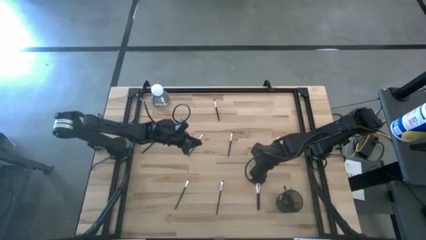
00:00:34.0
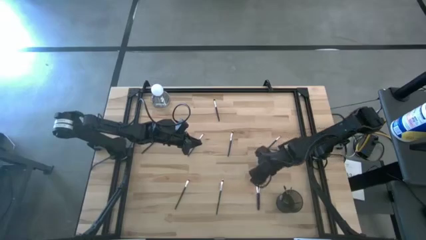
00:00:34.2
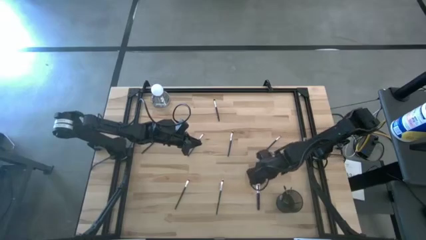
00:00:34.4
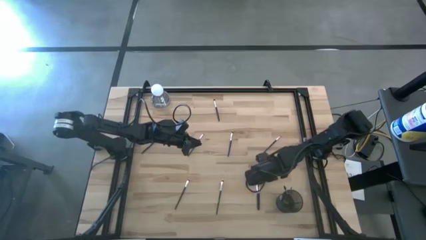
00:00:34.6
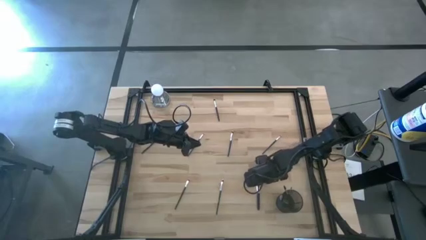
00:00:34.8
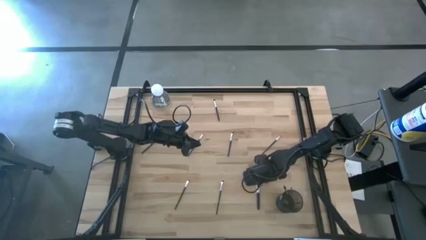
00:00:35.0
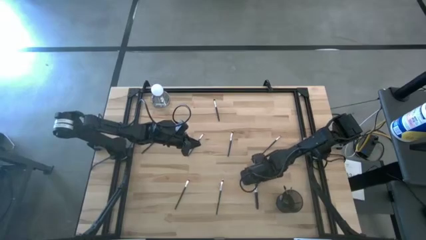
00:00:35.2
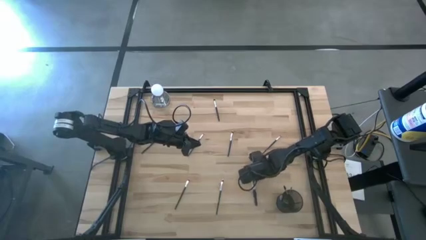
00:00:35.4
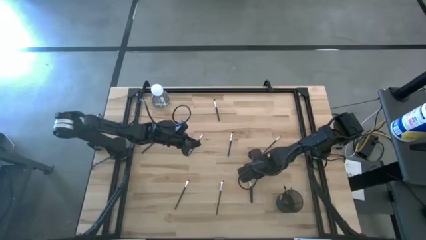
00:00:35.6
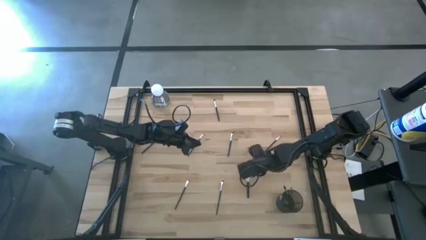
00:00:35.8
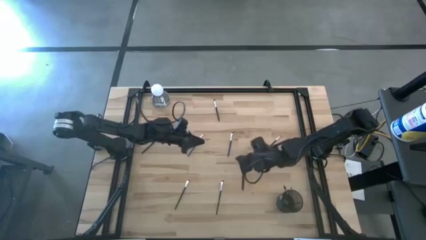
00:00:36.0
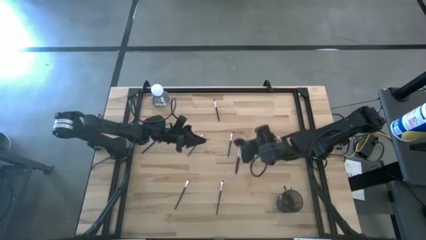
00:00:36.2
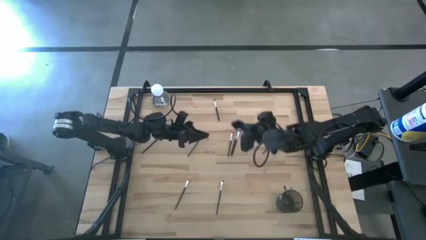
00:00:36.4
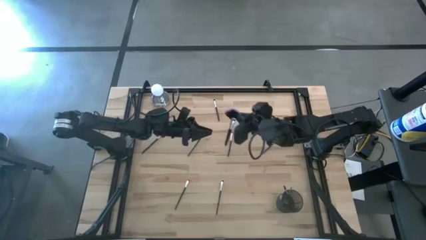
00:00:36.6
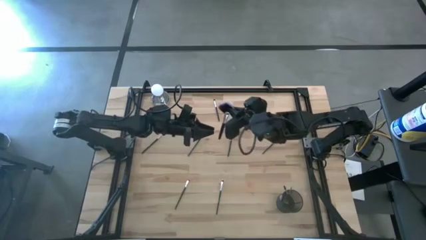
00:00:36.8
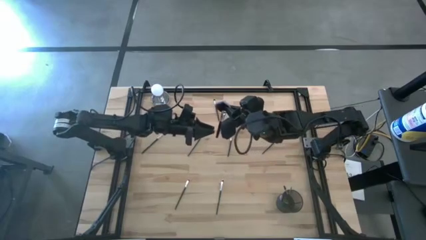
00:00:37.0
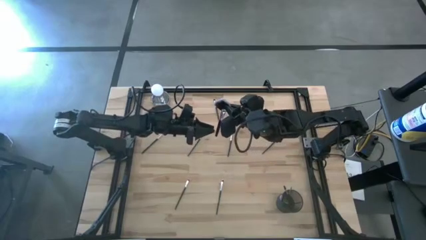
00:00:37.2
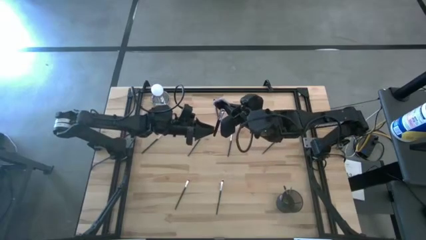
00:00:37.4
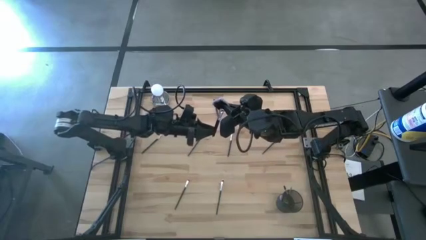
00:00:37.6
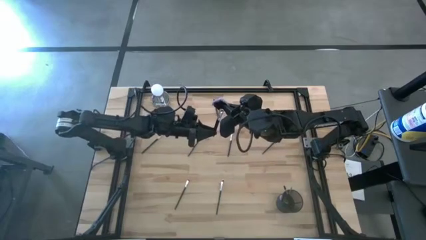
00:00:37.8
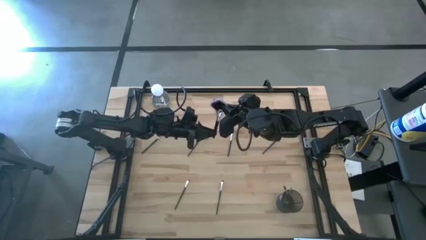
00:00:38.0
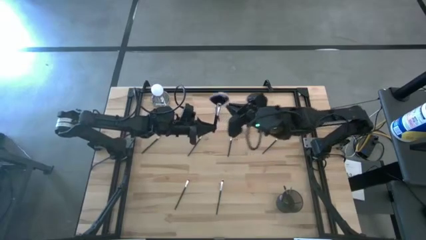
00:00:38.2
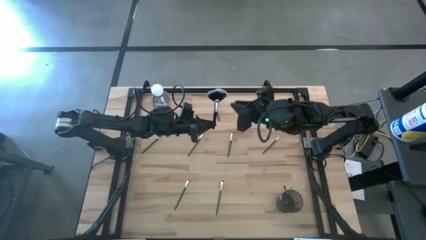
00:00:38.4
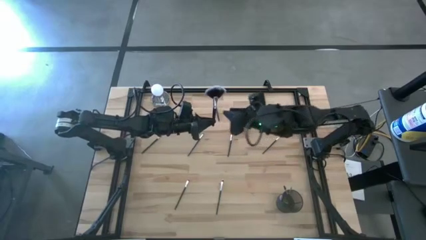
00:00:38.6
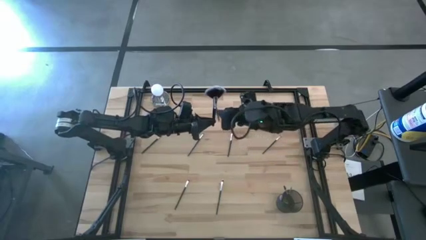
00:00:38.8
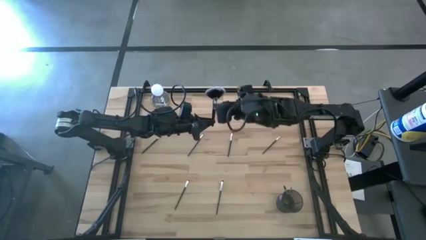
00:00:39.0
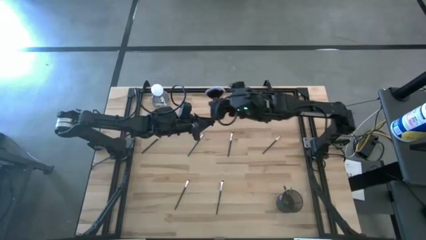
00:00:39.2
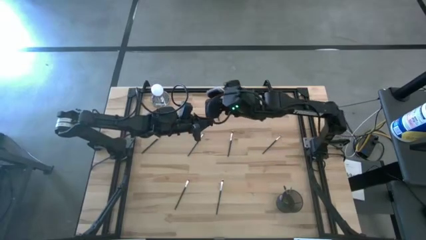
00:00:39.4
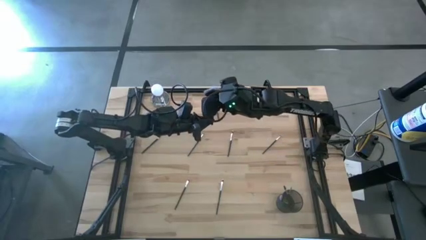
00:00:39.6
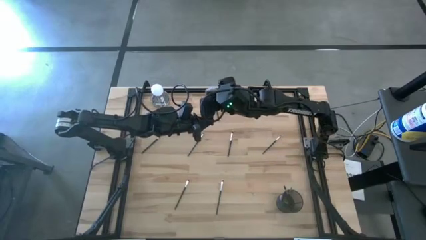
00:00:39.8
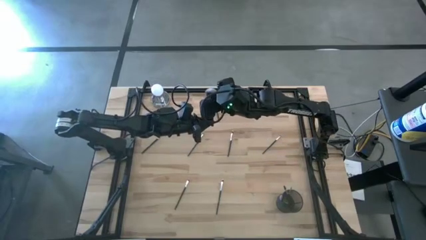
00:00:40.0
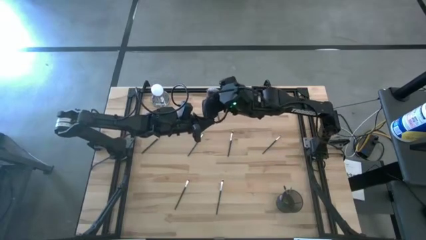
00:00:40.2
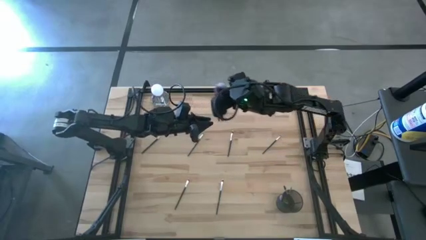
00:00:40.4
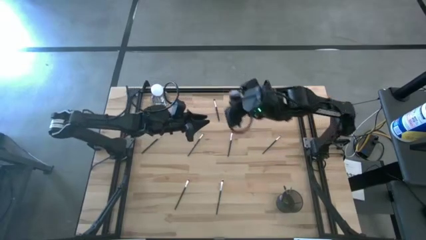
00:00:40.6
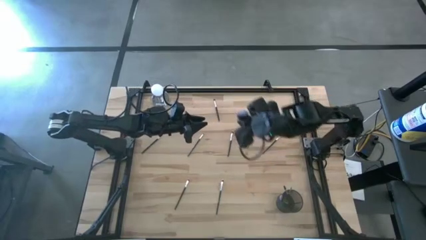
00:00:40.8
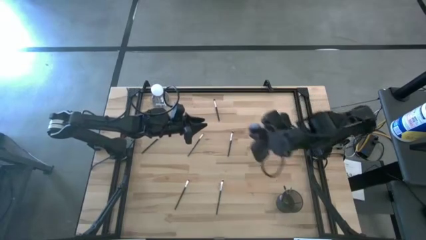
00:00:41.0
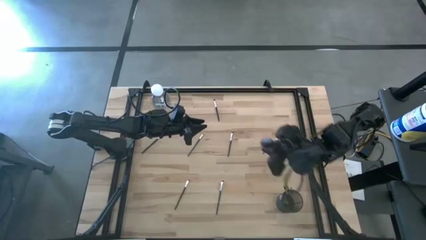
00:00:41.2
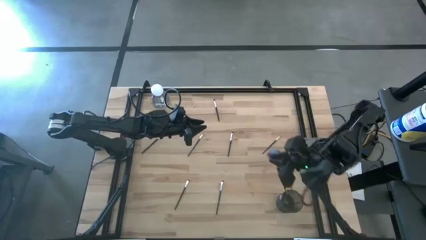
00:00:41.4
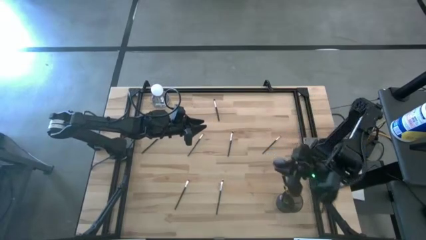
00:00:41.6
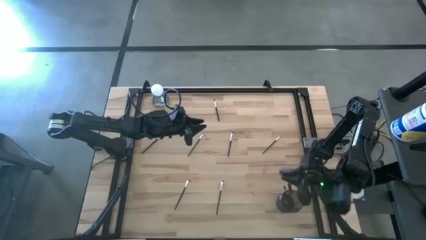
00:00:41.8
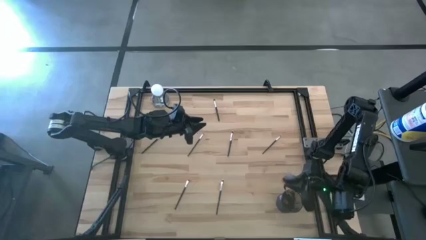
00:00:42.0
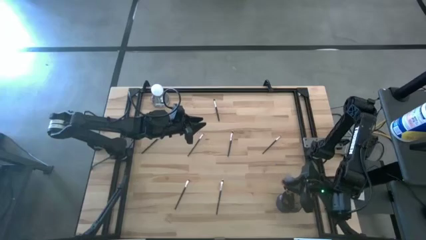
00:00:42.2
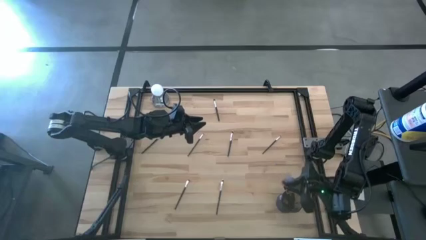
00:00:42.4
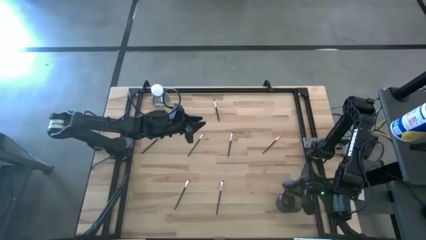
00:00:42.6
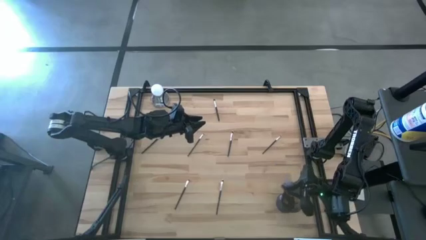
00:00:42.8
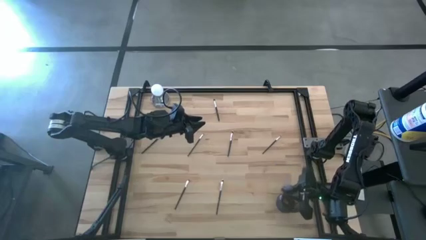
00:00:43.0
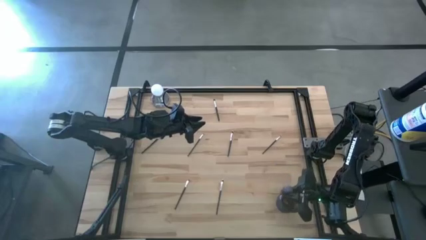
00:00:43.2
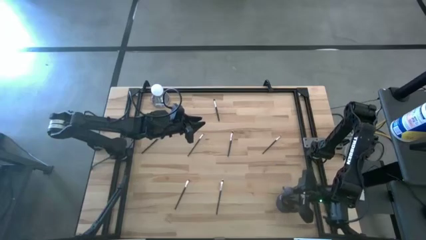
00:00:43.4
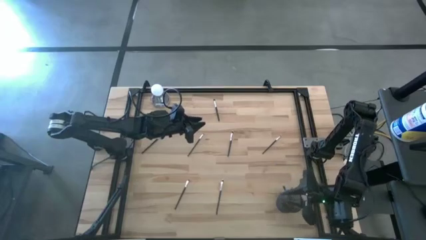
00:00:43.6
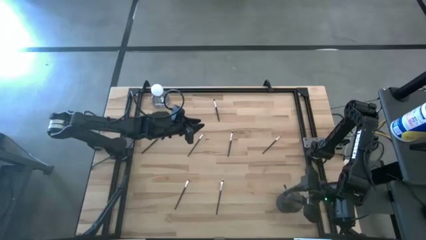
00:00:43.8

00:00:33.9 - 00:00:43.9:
Task: Put items in baskets/containers
Put the highlighter brush into the brush holder

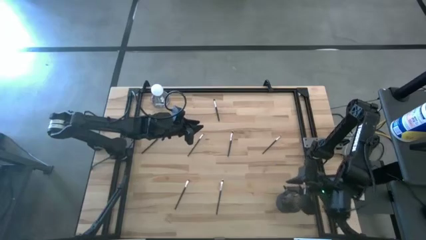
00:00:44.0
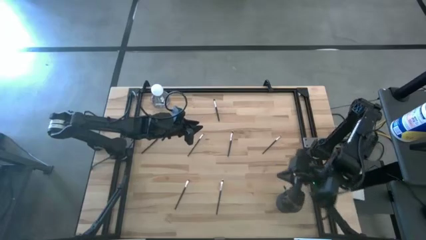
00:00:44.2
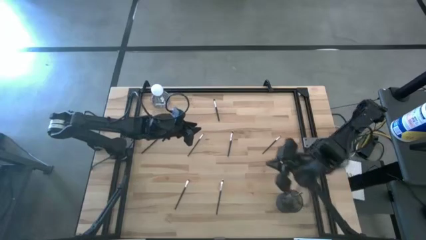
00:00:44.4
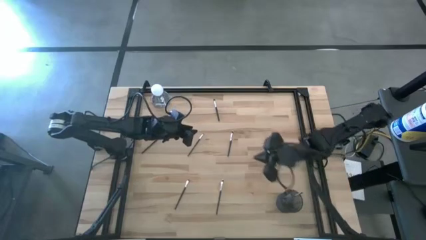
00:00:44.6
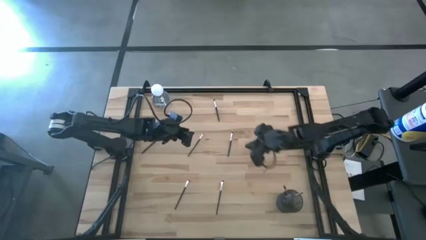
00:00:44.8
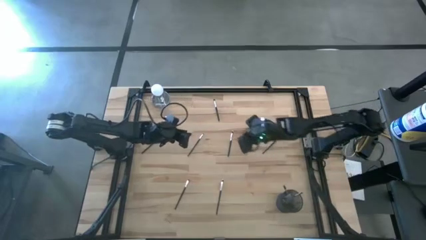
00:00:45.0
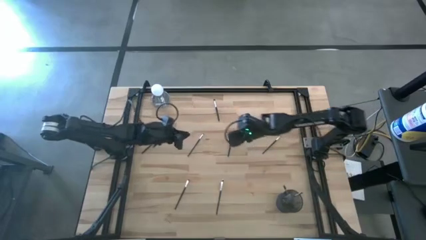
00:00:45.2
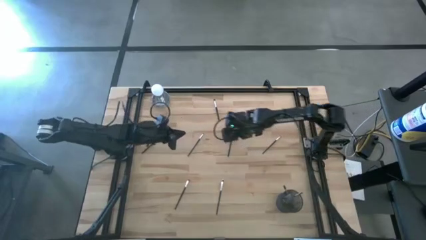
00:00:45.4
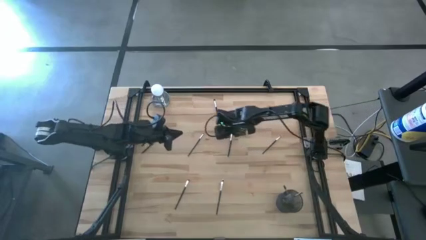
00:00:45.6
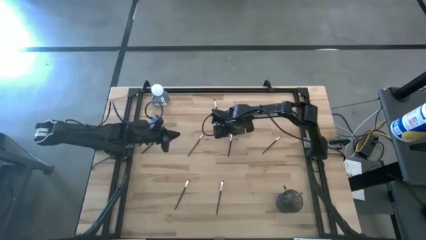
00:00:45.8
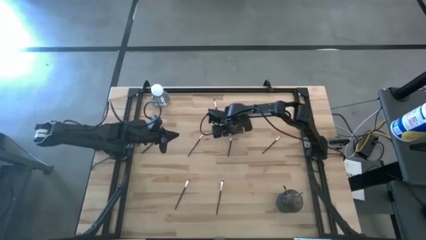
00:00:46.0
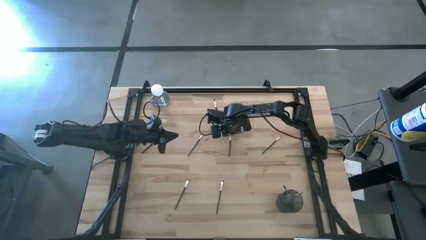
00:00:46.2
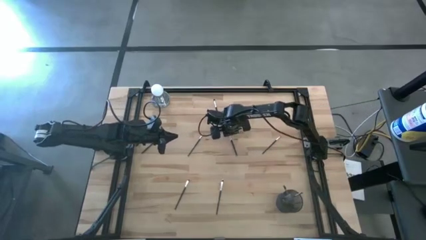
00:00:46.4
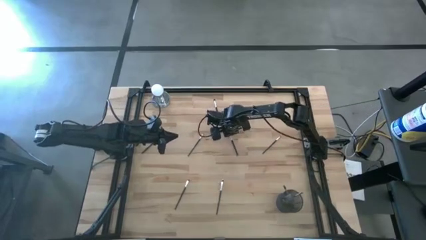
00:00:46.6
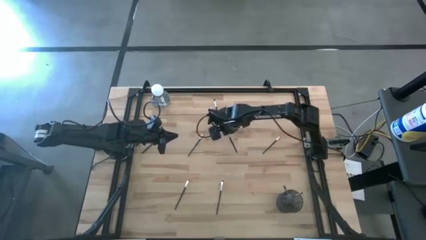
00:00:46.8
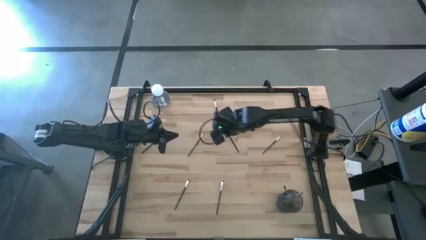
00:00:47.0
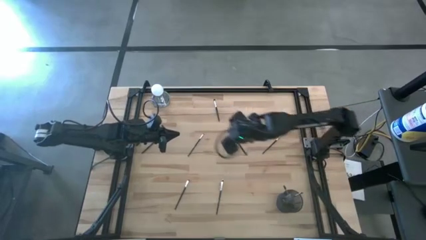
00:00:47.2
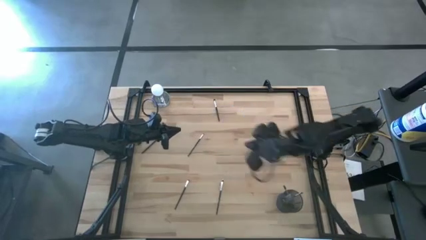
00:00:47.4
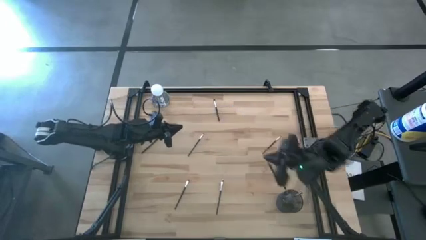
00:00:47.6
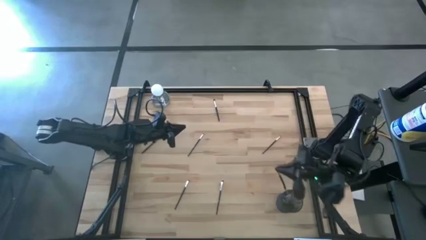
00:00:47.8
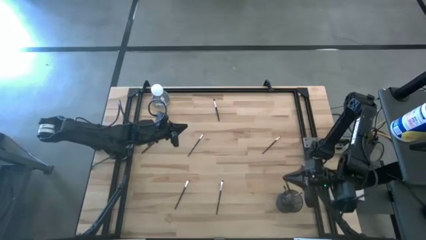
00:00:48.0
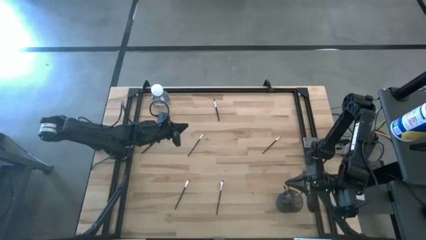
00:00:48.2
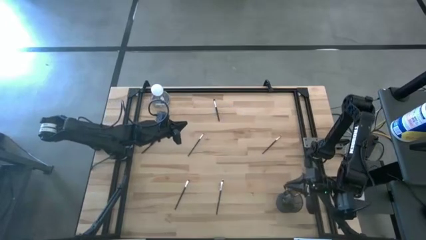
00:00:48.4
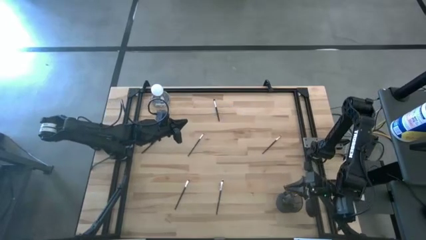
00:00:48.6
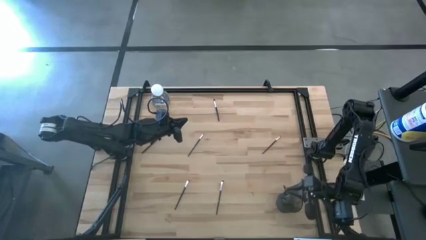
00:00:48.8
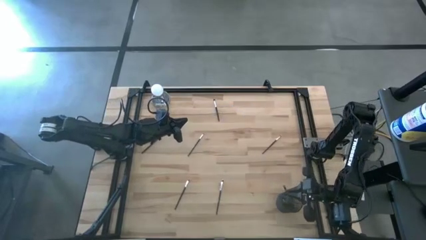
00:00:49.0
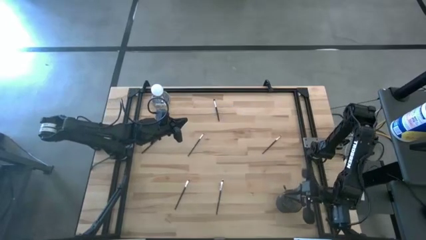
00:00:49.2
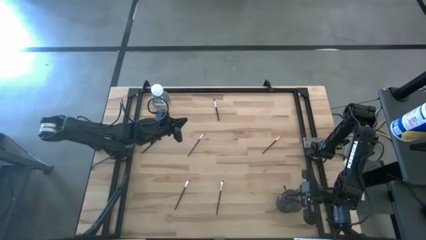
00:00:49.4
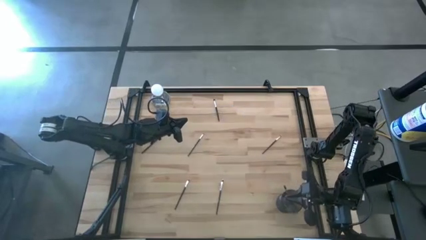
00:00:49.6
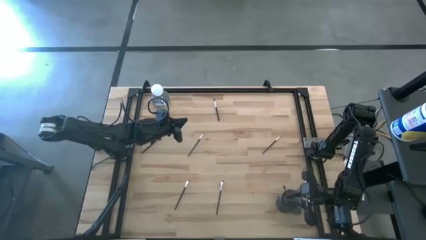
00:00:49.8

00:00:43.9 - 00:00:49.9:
Put the eyeshadow brush into the brush holder
